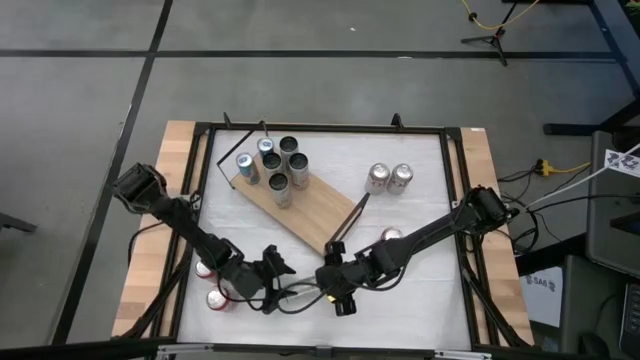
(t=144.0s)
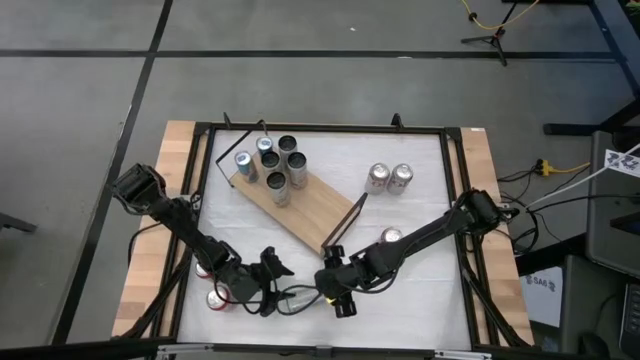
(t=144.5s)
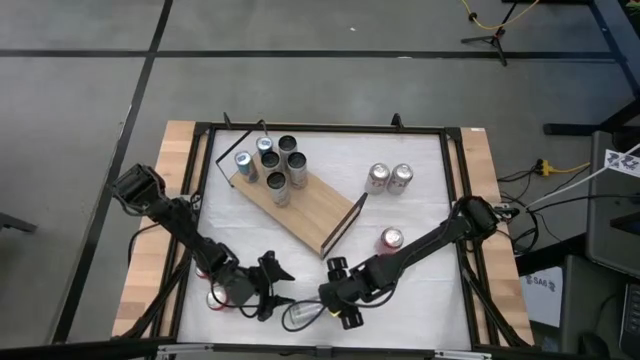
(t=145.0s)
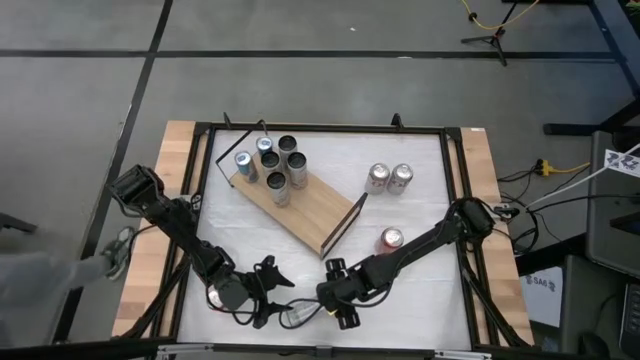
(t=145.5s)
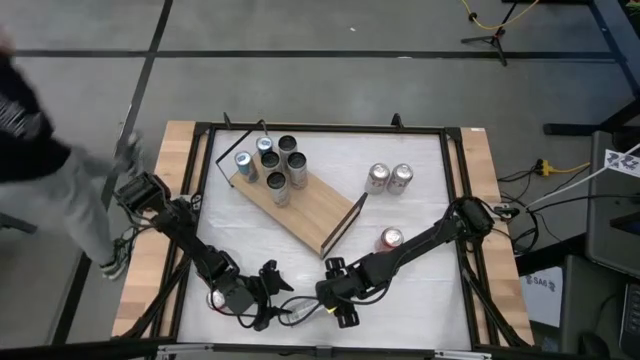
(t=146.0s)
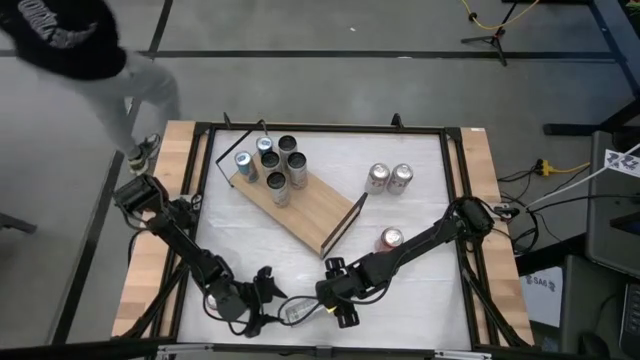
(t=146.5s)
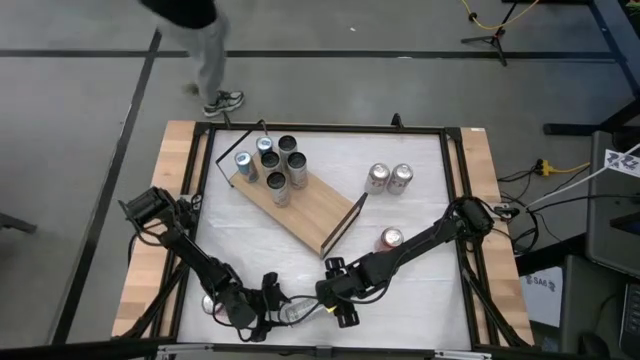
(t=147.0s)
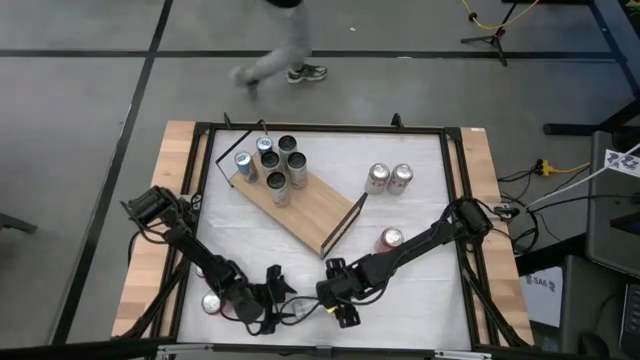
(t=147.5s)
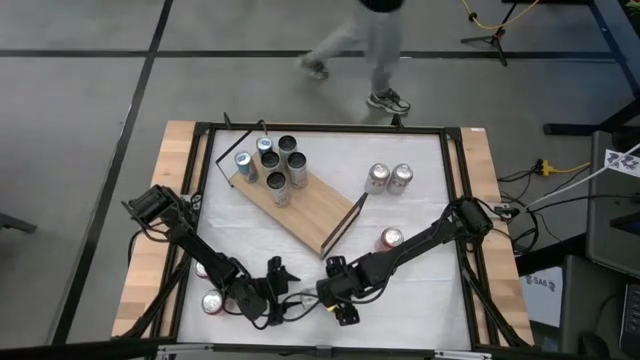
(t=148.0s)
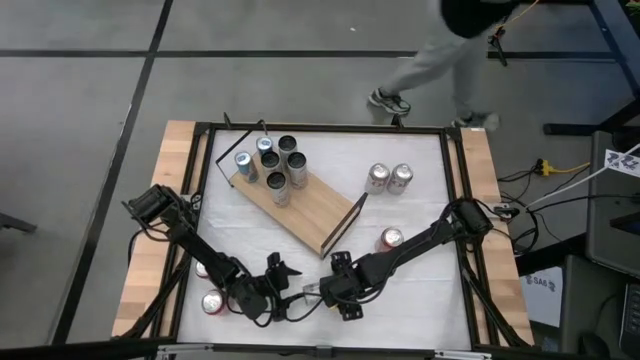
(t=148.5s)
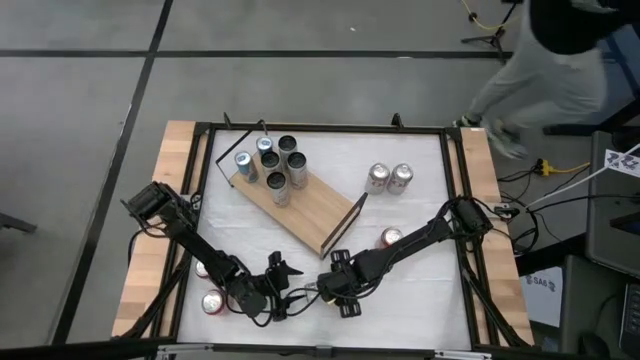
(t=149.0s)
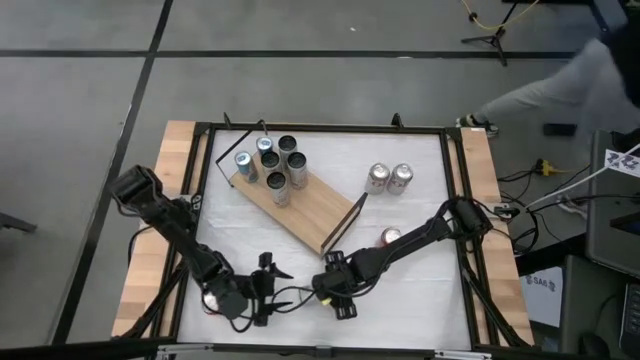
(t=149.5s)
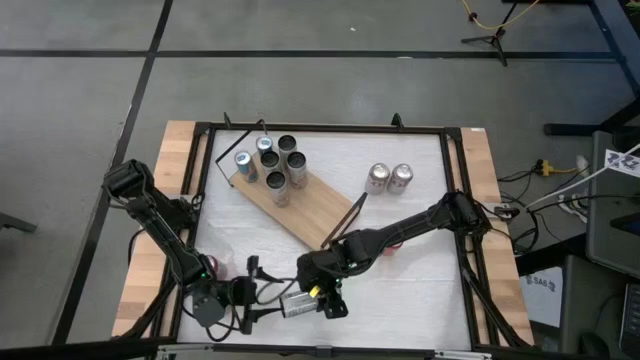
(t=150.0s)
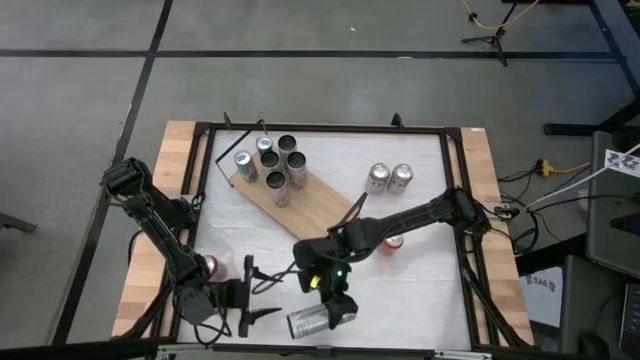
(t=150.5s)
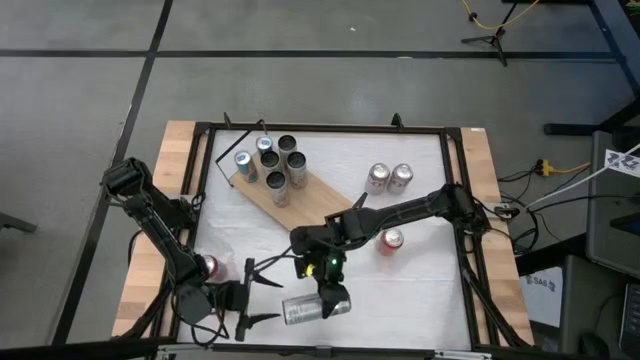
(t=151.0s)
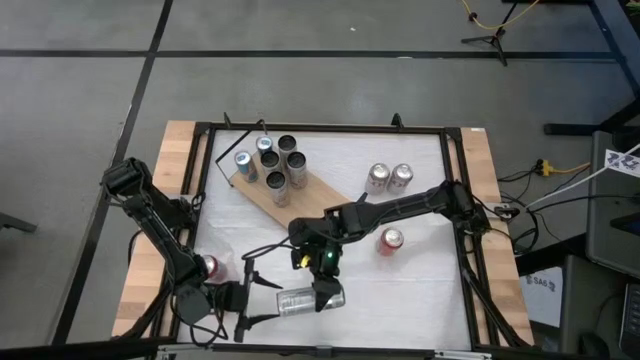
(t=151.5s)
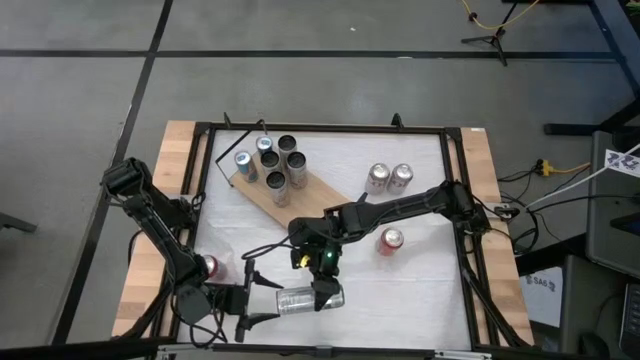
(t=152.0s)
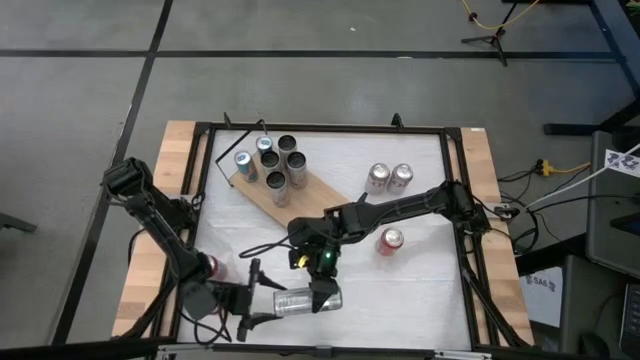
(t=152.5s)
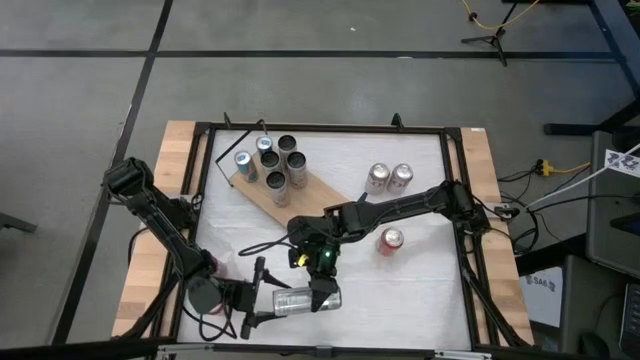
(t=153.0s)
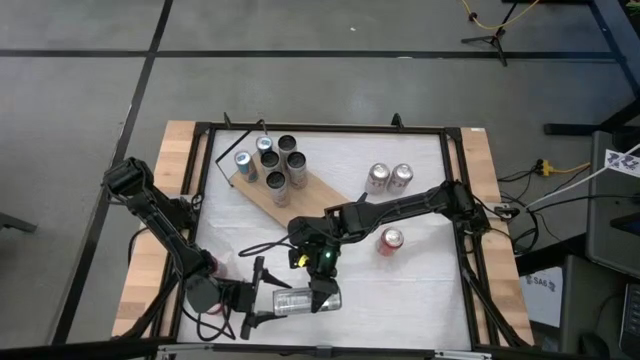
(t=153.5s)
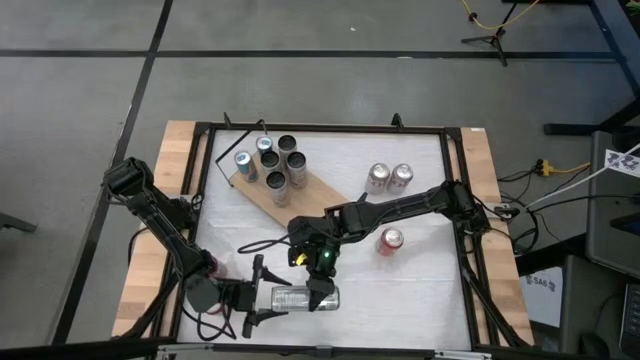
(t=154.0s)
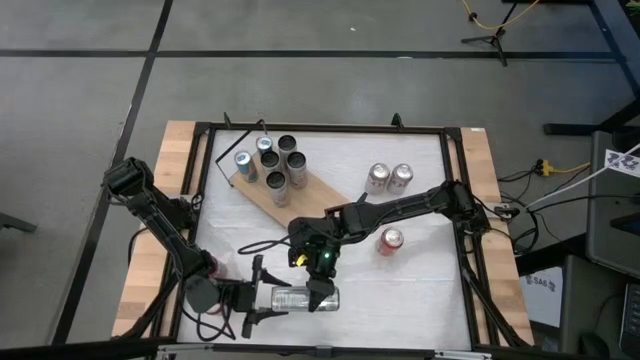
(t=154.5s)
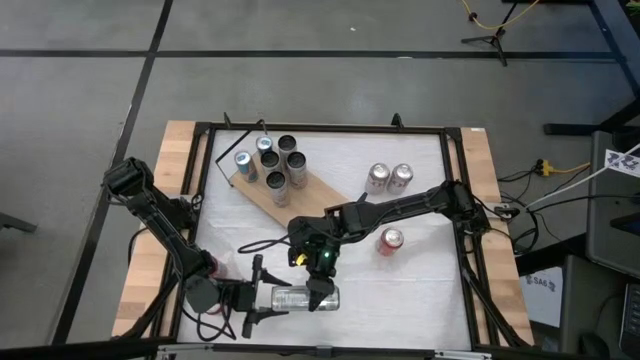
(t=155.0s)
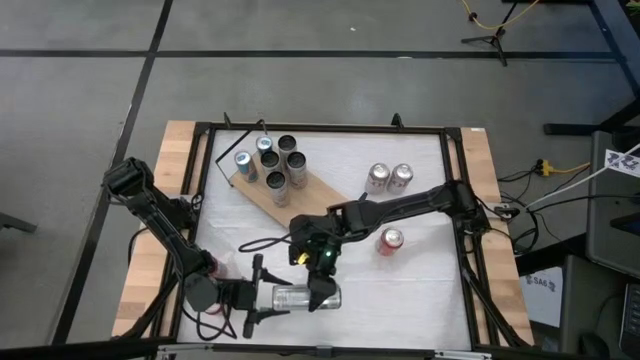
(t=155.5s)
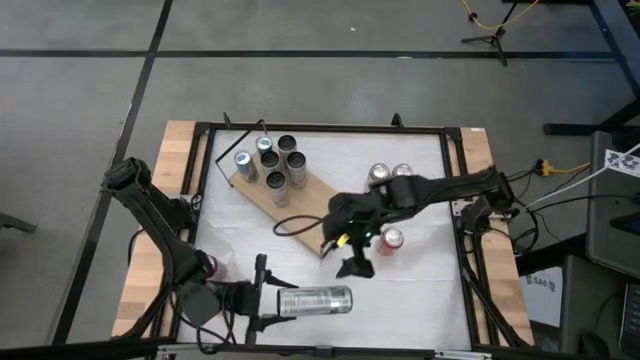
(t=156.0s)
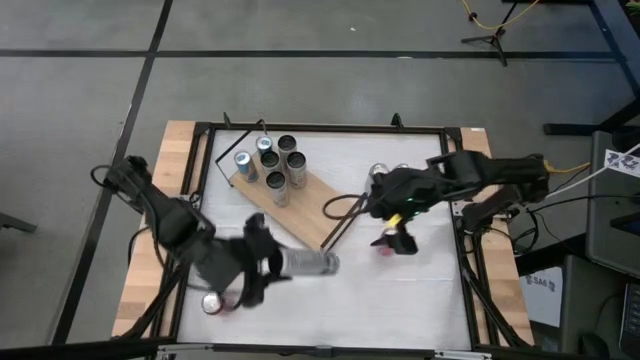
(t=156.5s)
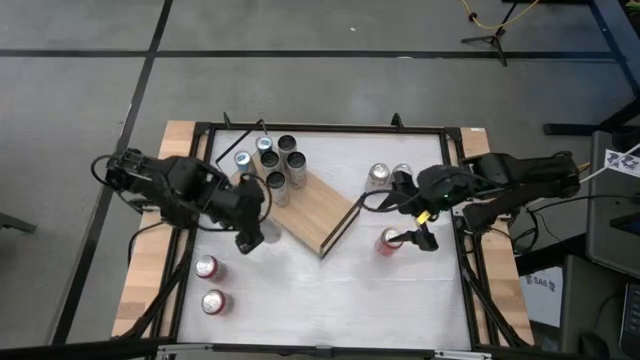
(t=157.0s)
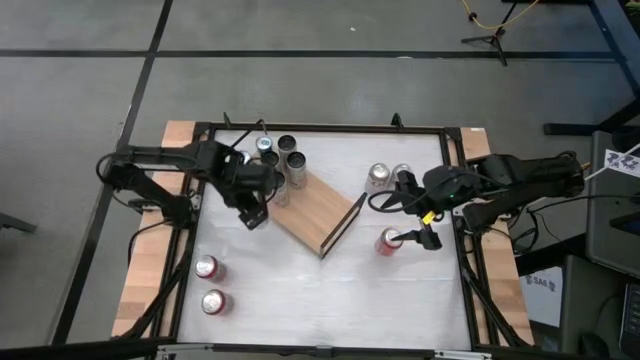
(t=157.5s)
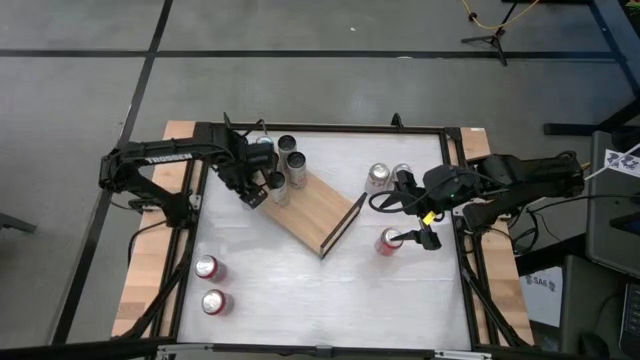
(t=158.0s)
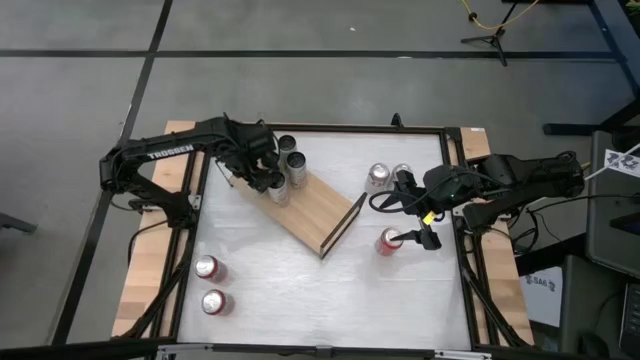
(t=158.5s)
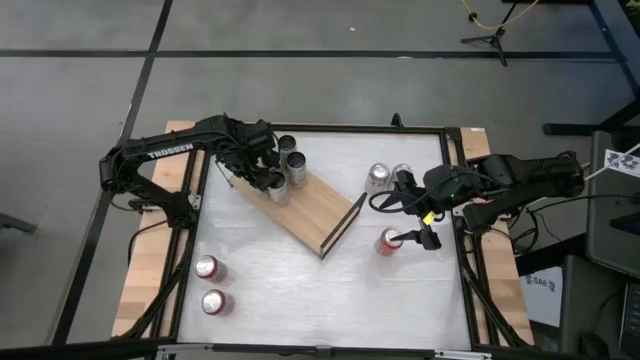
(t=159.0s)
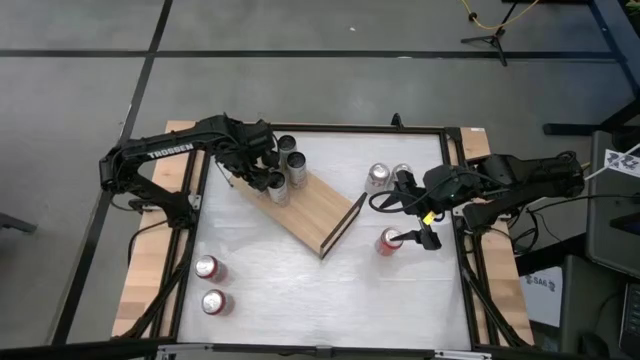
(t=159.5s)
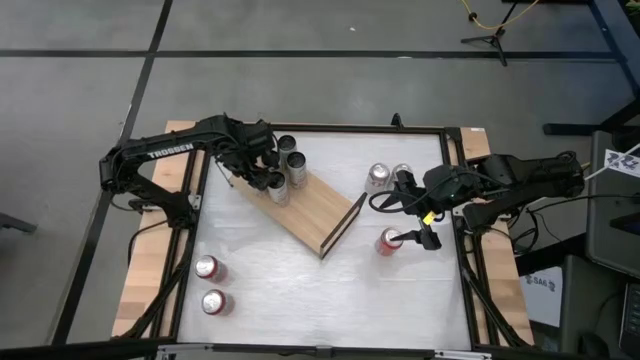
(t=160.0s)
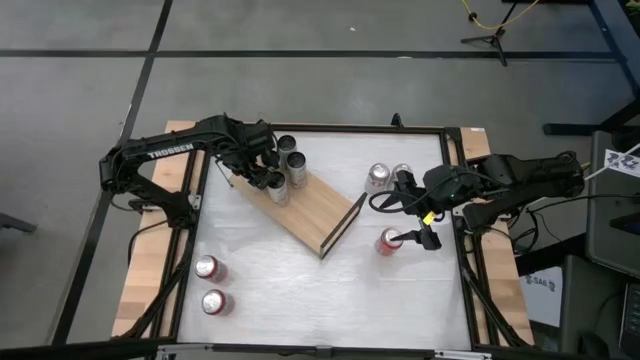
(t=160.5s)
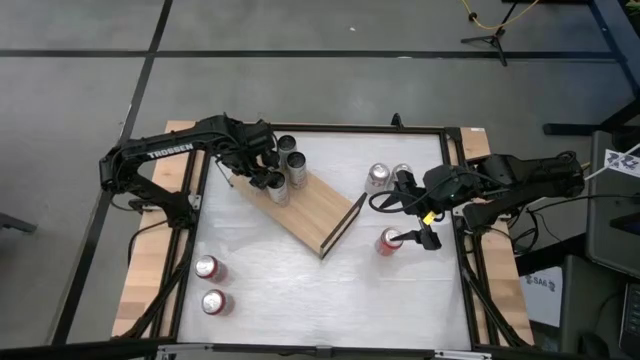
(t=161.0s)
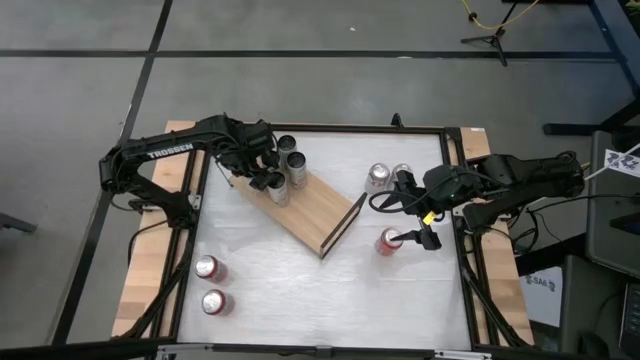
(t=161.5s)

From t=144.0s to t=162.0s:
Task: Place canned beverage on shelf
Put the white-yellow soda can aligned with the other white-yellow soda can on the shelf

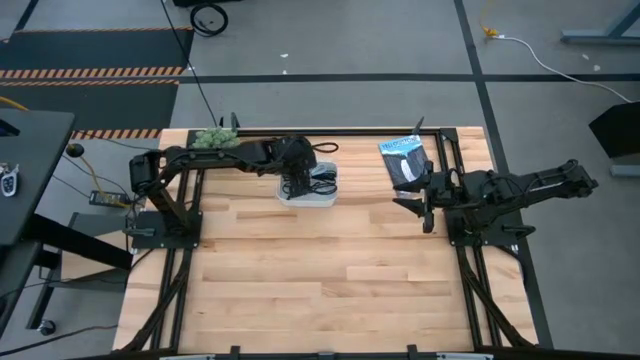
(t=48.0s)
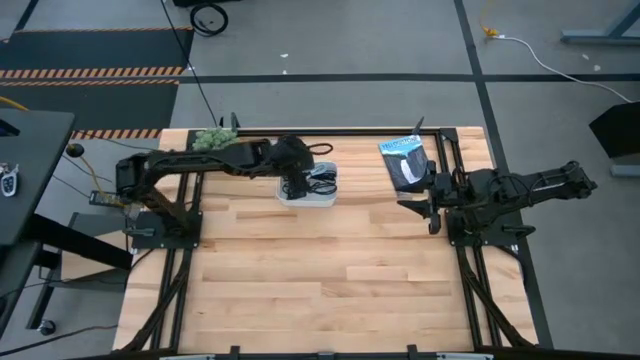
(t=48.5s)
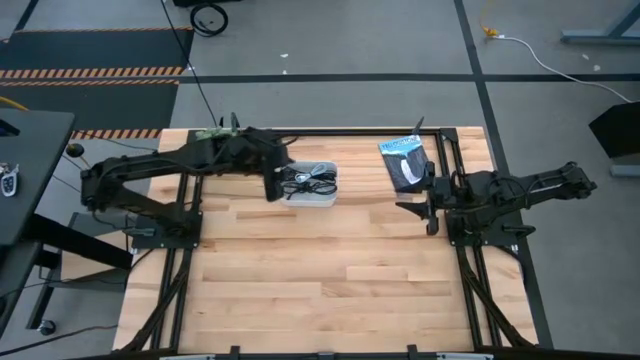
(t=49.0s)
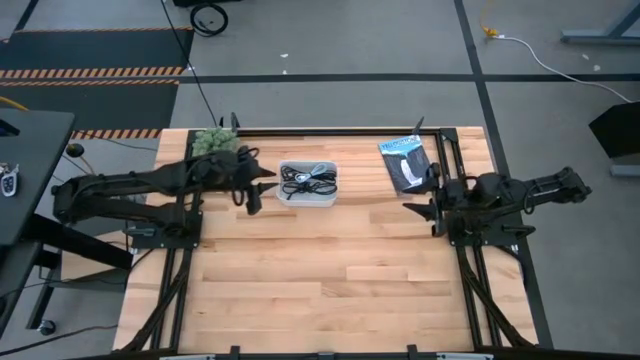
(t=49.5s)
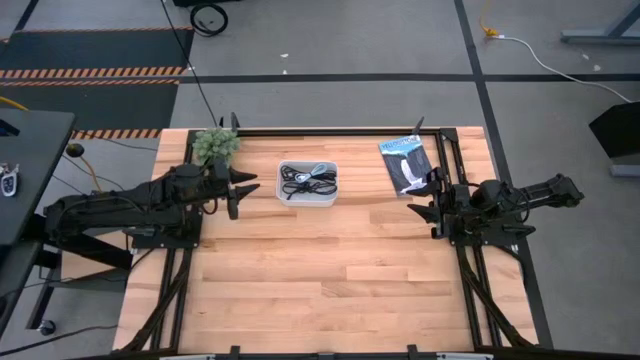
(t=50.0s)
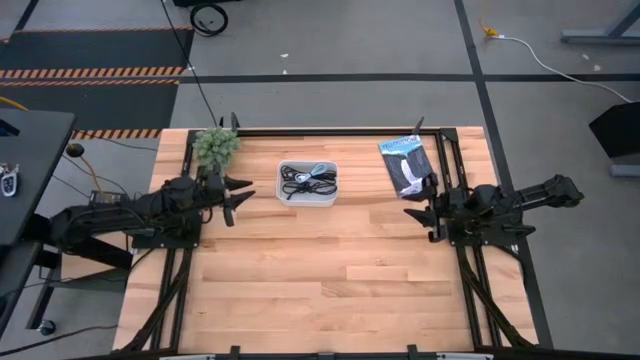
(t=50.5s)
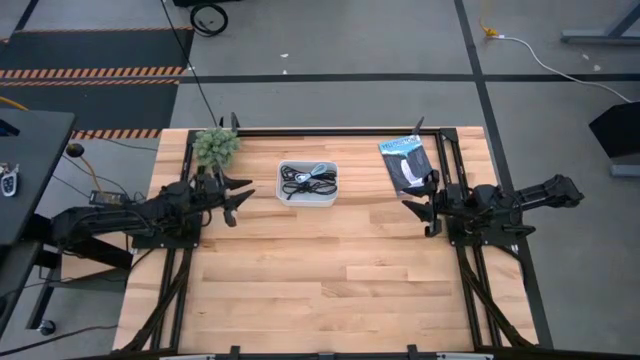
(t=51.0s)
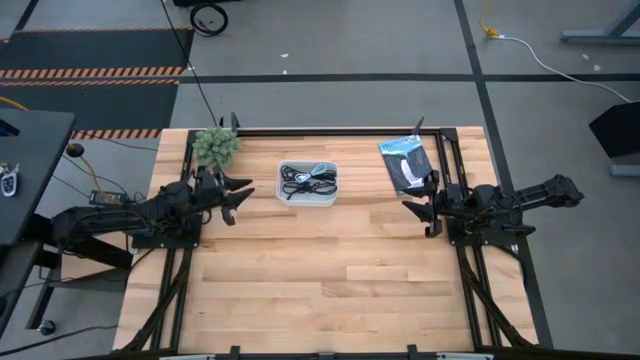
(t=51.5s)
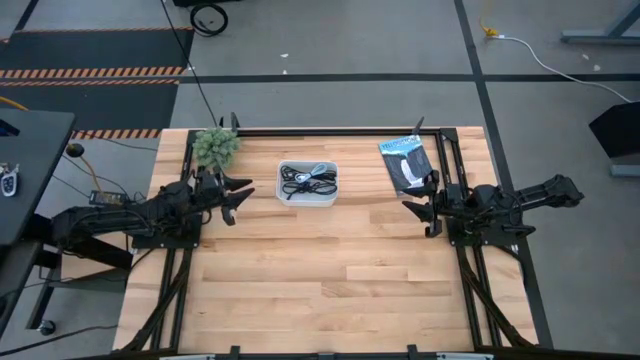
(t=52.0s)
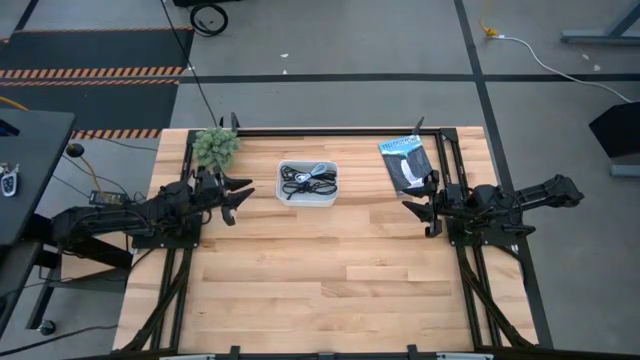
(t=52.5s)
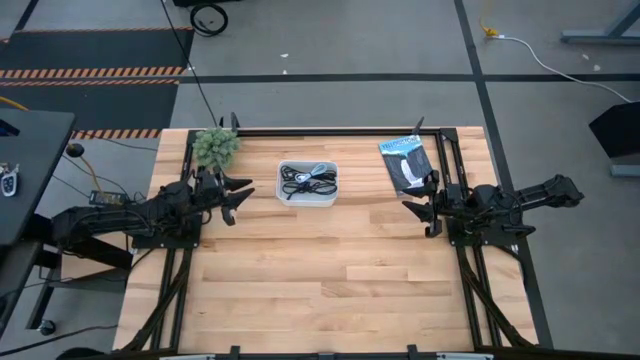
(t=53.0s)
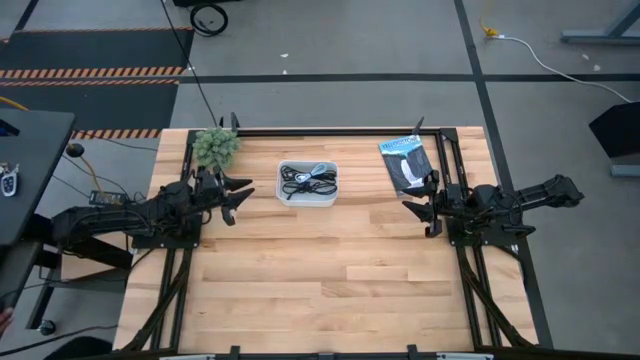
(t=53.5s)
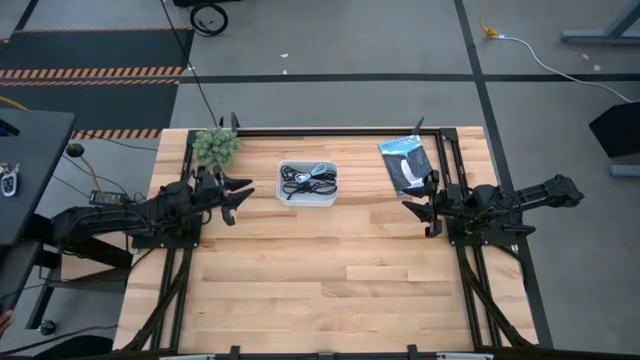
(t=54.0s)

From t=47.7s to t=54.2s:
Task: Pick and place USB-C Cables
Return to Home Position
